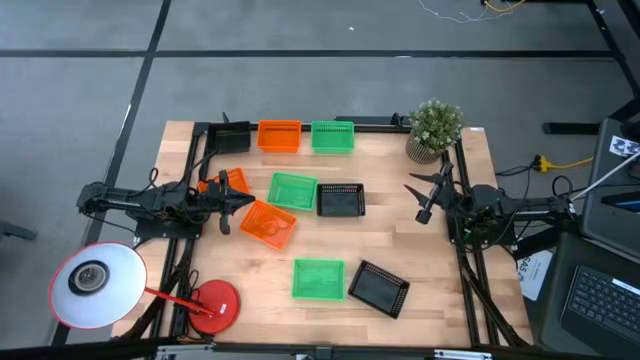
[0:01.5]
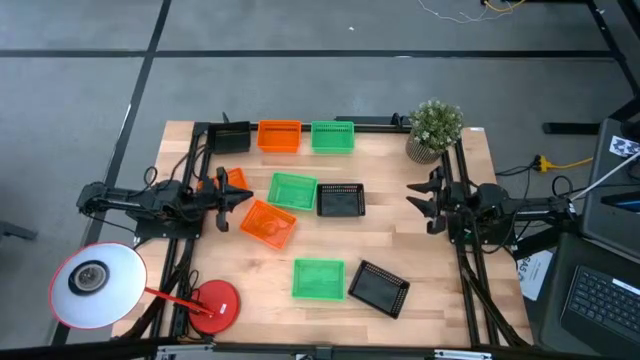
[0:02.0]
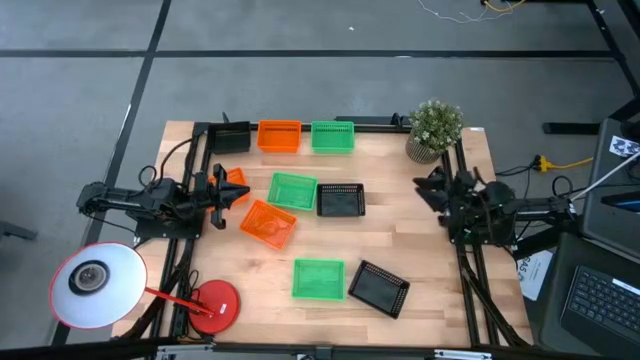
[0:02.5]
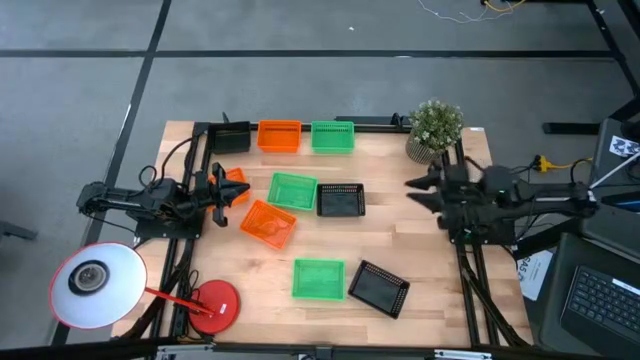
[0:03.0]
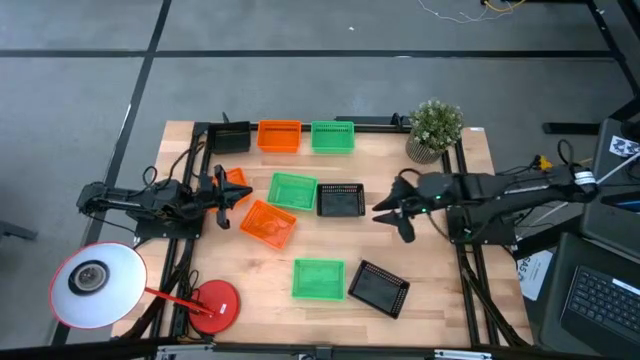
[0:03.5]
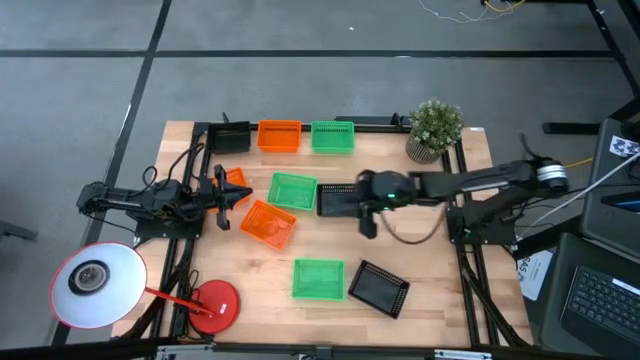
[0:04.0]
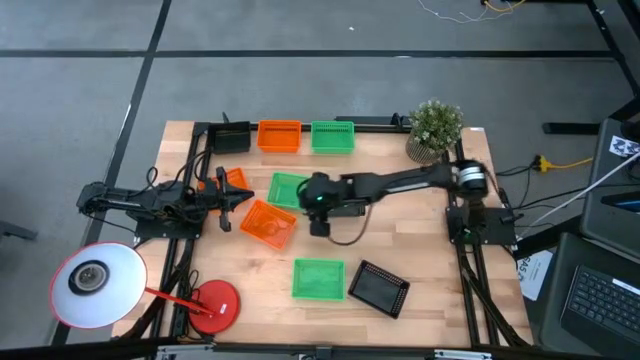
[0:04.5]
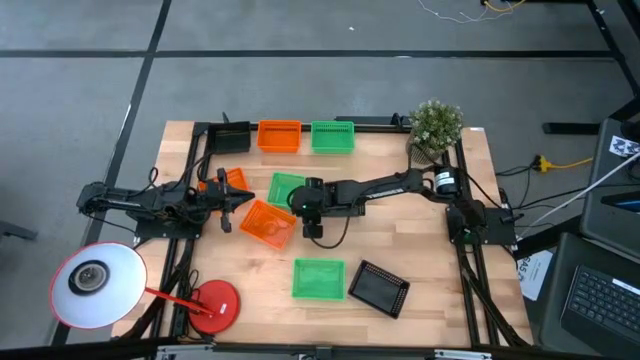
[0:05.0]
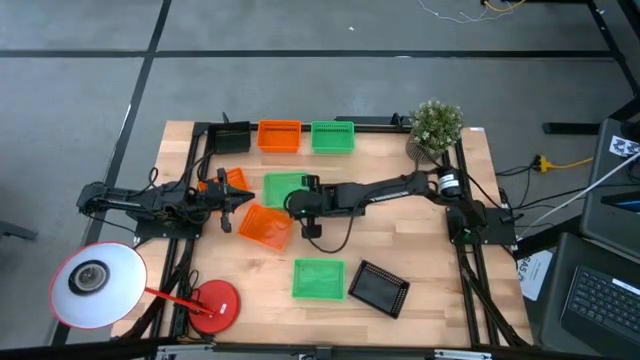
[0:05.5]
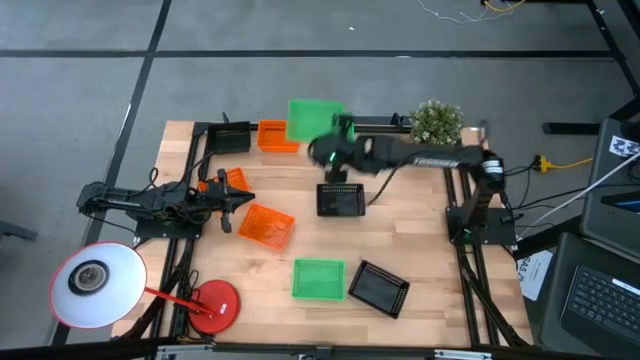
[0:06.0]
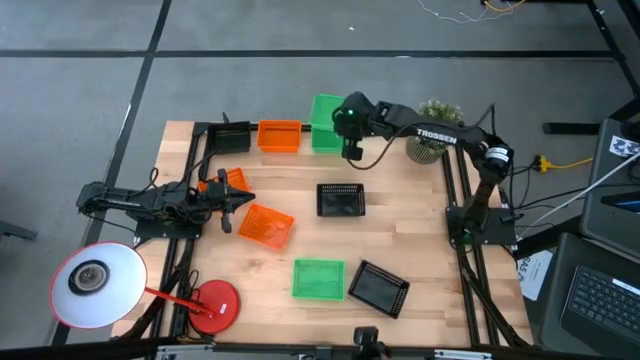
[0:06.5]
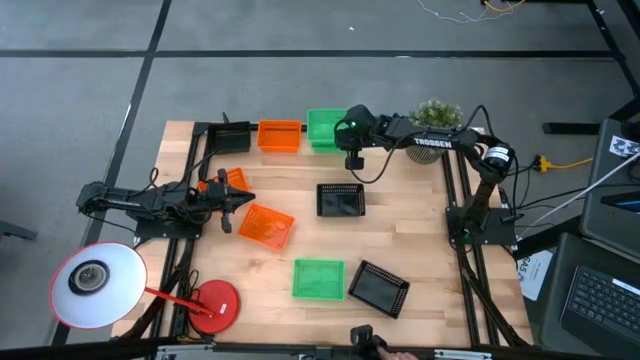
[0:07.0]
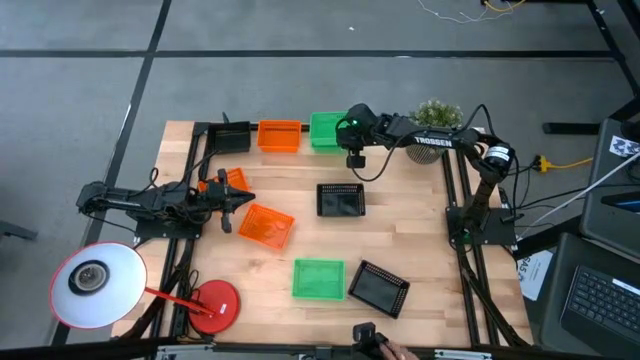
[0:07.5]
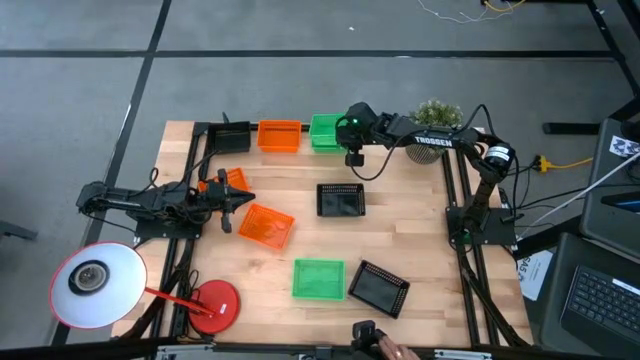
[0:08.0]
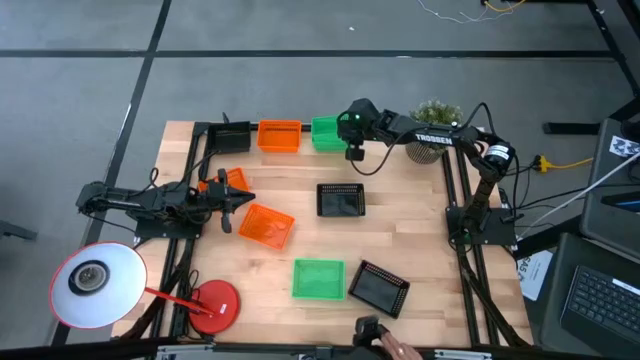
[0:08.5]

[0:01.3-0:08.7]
Stack the middle green bin on top of the top green bin

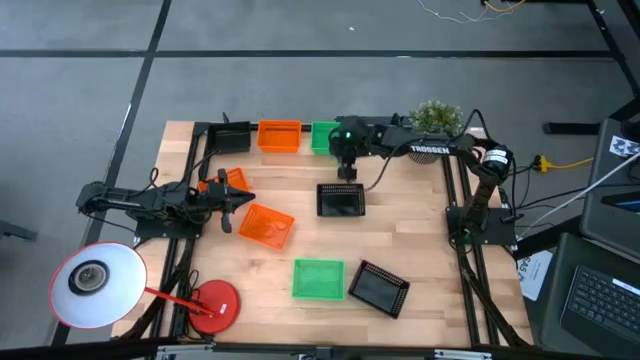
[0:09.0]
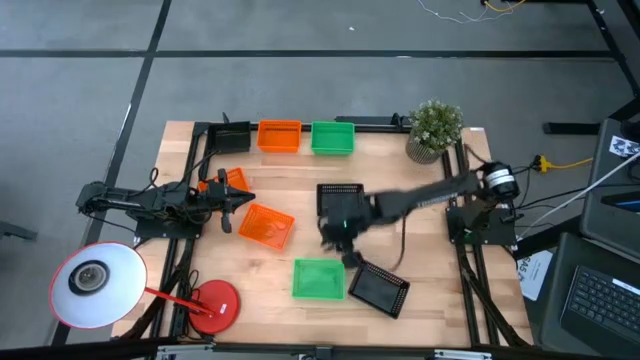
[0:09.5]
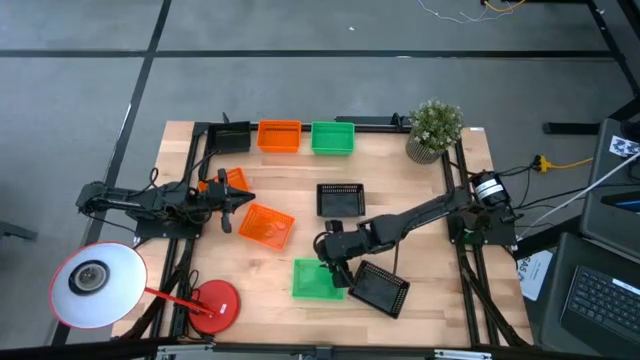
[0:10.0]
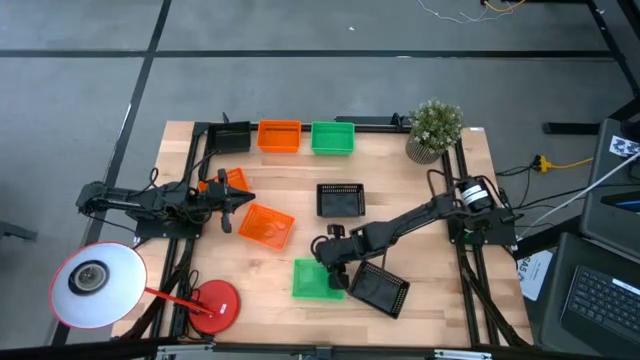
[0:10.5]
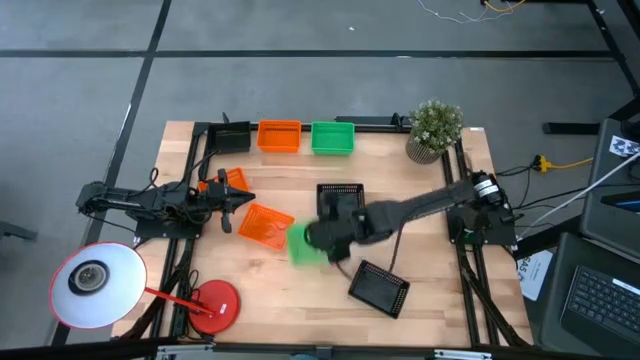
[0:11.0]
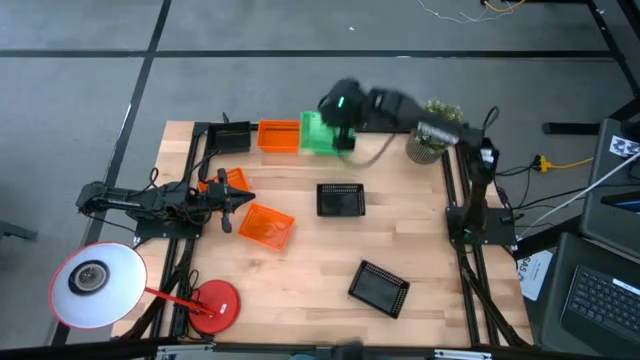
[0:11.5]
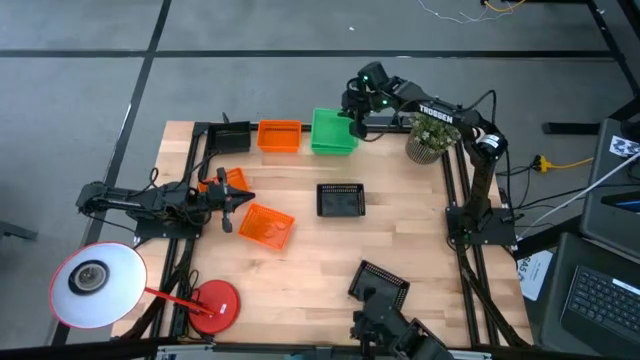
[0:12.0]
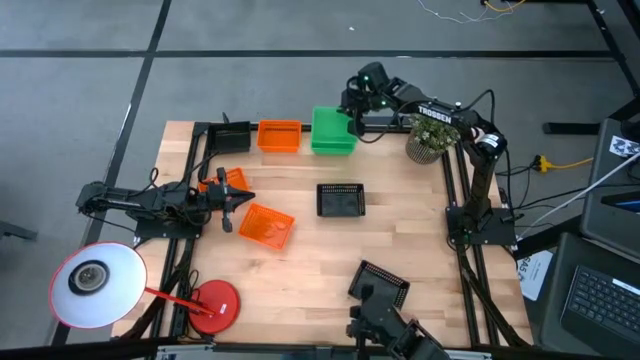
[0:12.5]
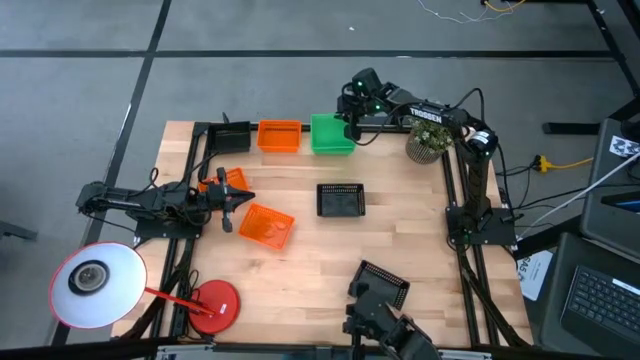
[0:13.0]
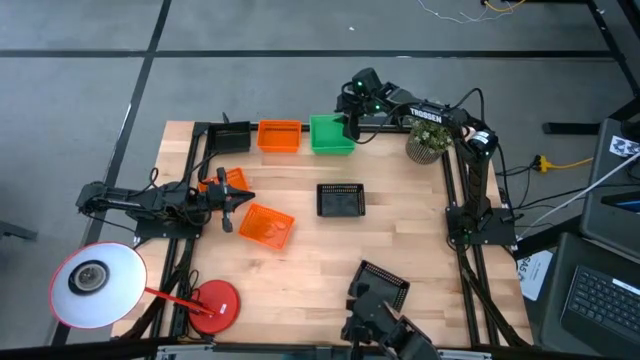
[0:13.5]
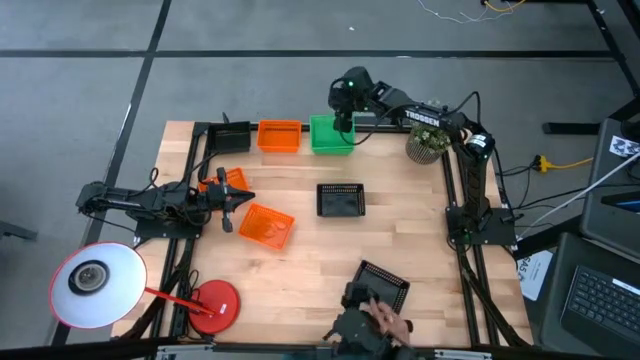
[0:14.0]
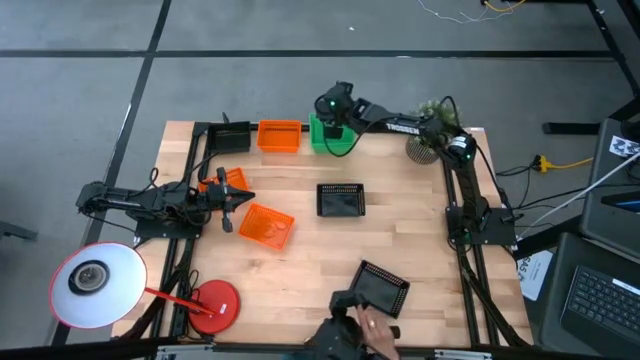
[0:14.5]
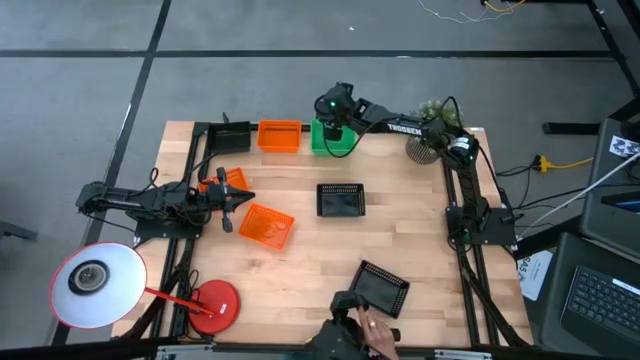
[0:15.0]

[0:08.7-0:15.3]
Stack the bottom green bin on top of the green bin

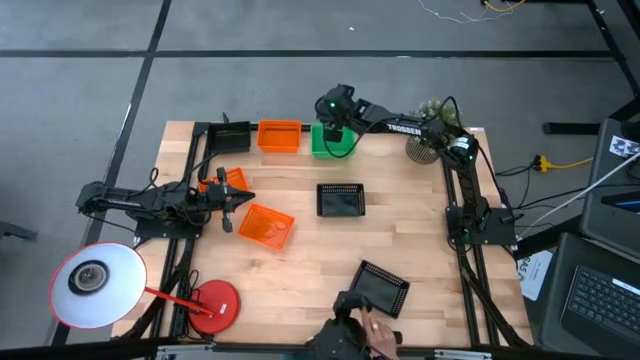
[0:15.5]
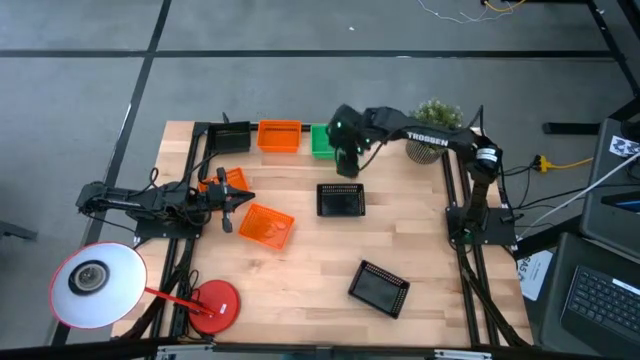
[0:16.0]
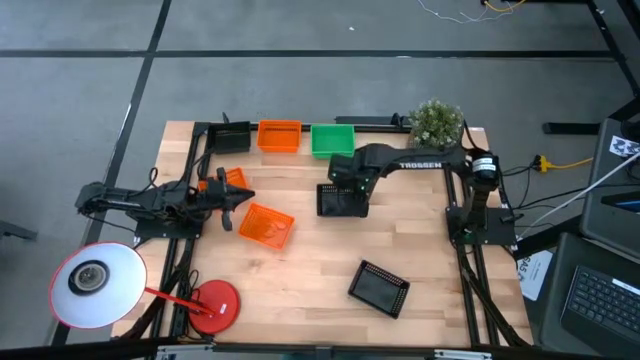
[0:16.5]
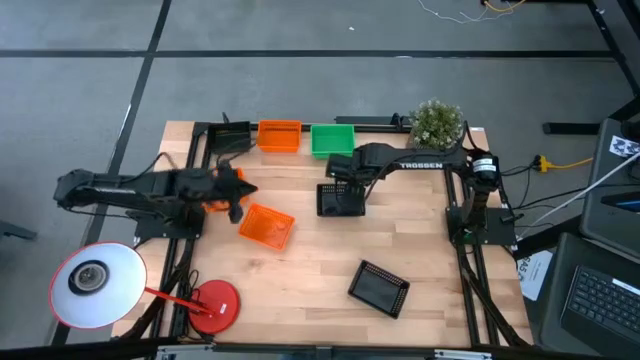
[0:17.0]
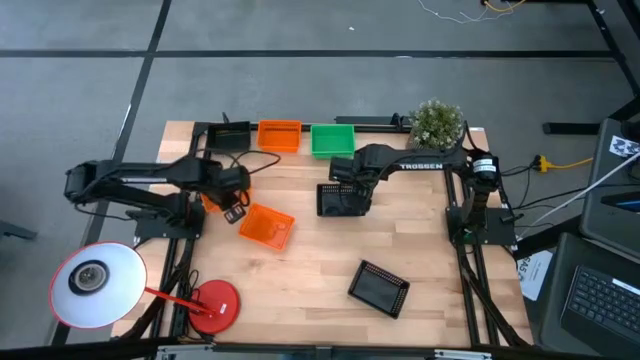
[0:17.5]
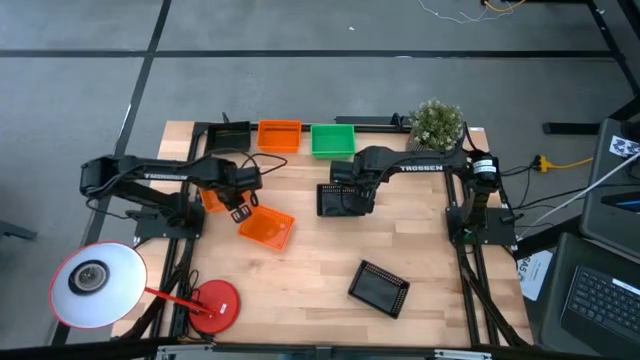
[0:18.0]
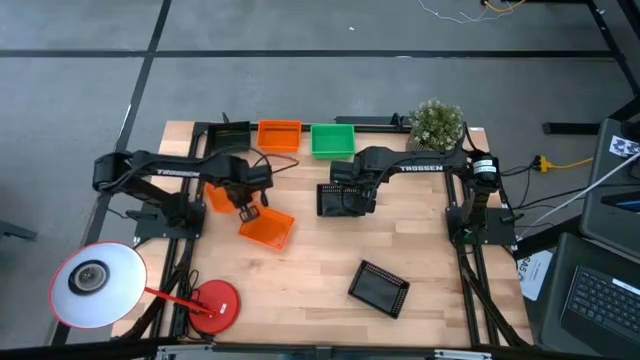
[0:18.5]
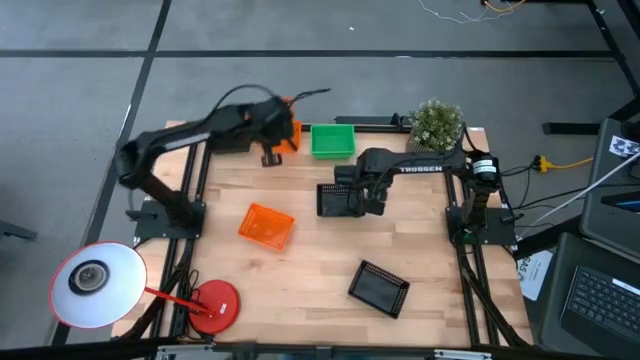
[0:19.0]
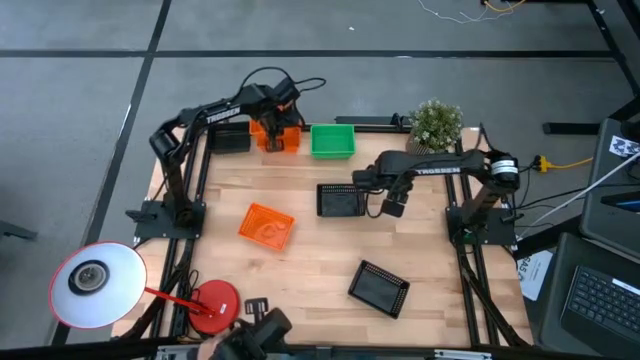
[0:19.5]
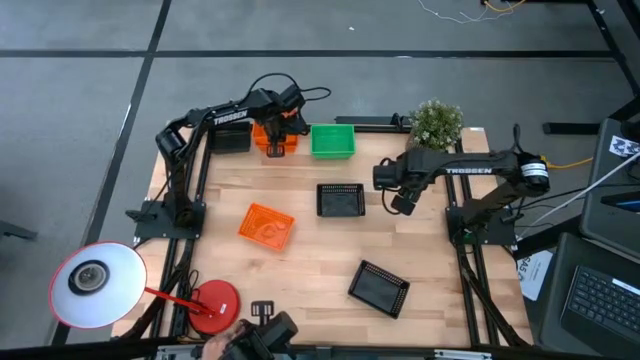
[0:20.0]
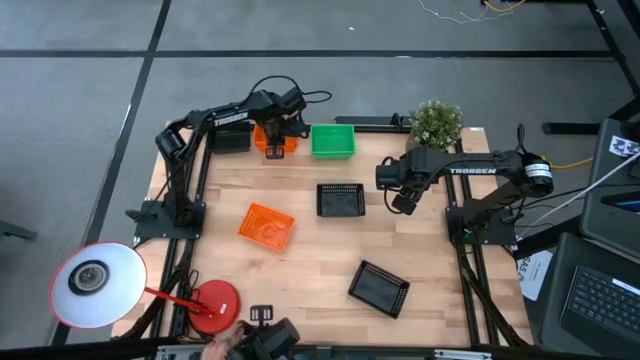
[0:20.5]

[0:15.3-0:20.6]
Stack the middle left orange bin on top of the top orange bin
